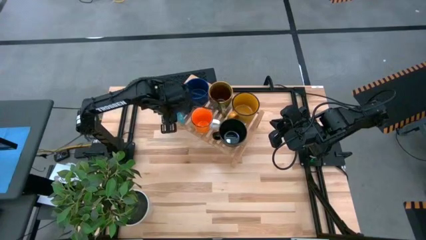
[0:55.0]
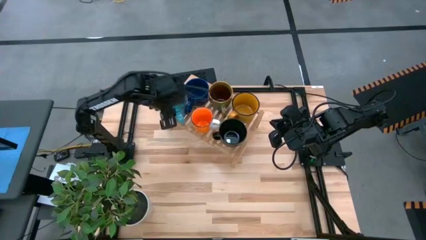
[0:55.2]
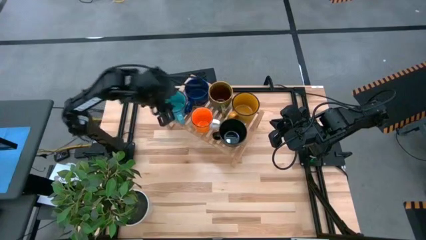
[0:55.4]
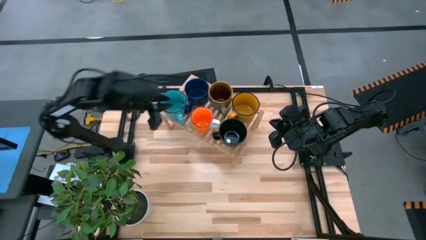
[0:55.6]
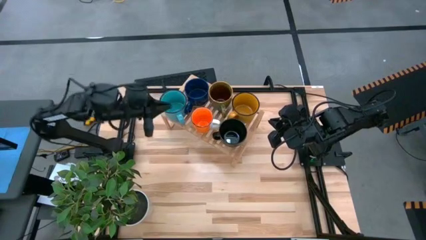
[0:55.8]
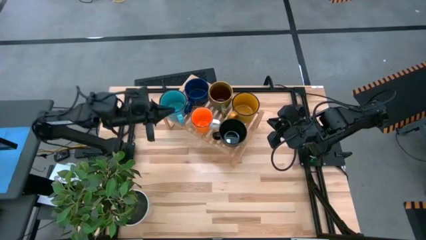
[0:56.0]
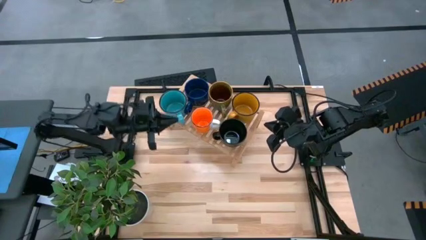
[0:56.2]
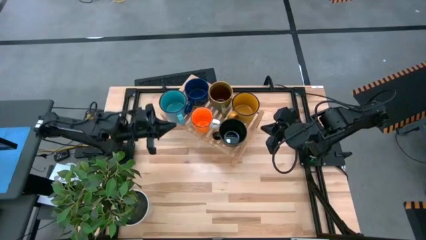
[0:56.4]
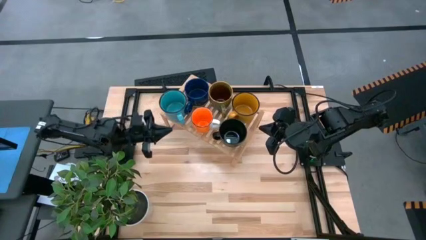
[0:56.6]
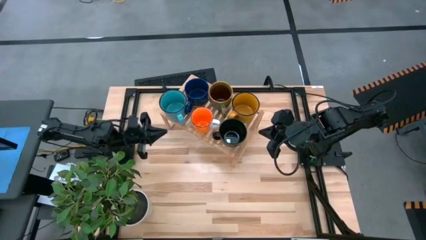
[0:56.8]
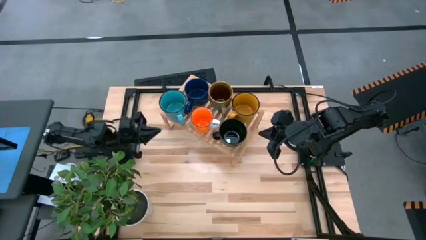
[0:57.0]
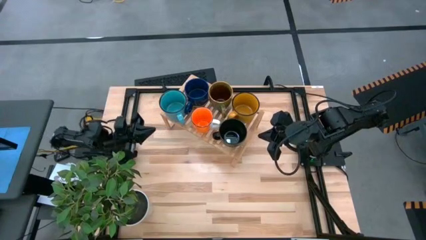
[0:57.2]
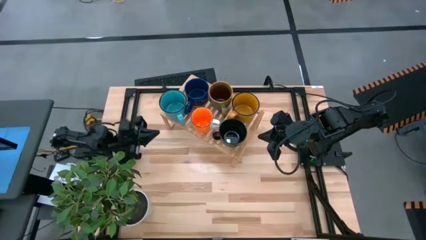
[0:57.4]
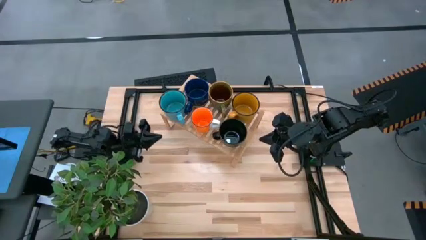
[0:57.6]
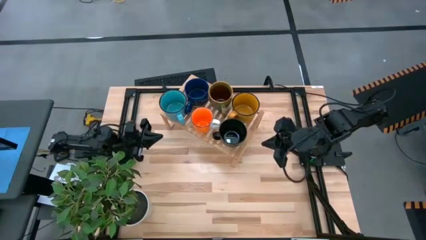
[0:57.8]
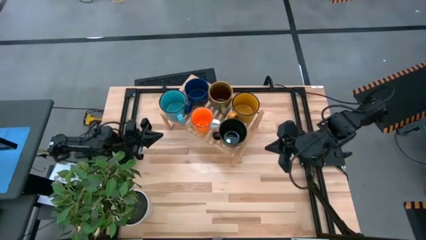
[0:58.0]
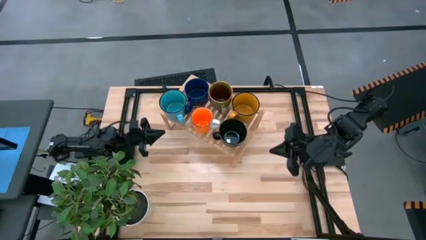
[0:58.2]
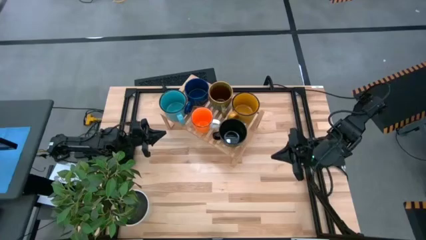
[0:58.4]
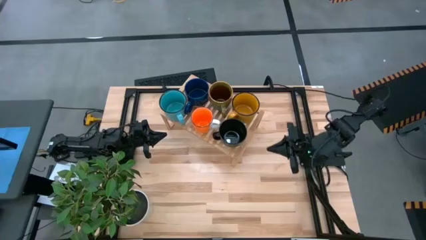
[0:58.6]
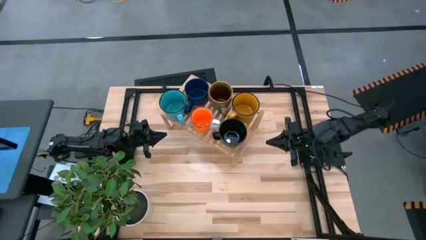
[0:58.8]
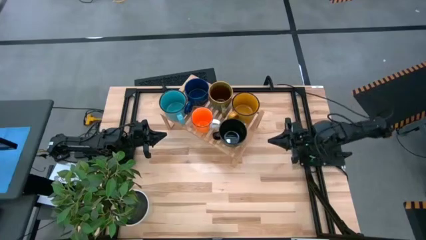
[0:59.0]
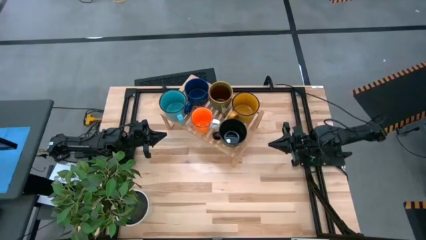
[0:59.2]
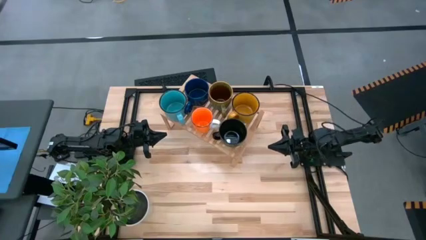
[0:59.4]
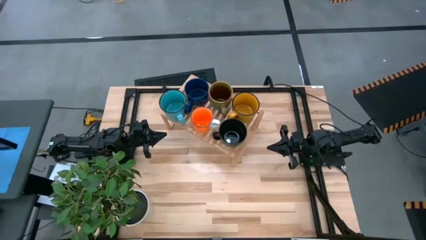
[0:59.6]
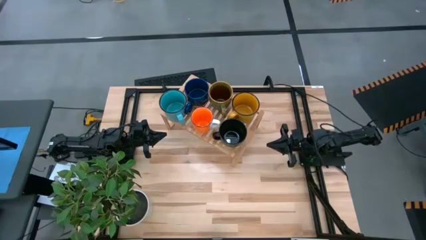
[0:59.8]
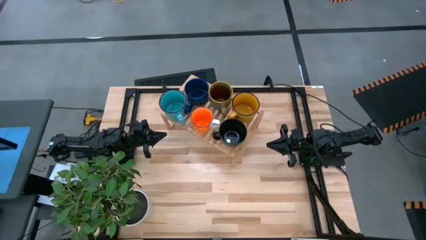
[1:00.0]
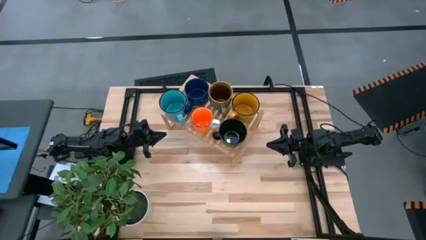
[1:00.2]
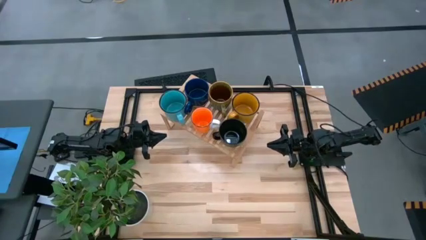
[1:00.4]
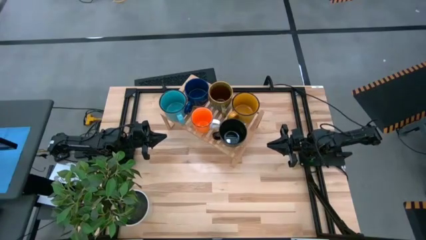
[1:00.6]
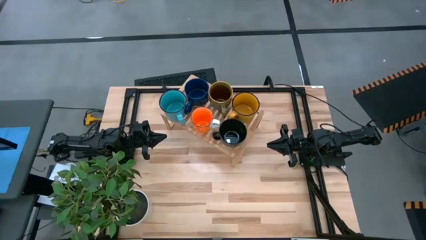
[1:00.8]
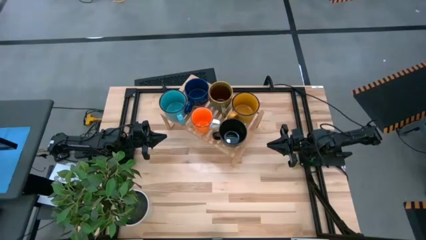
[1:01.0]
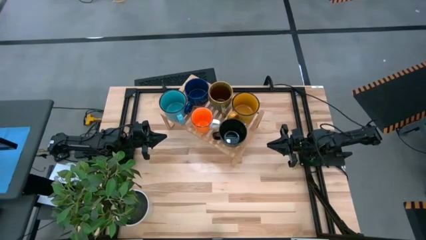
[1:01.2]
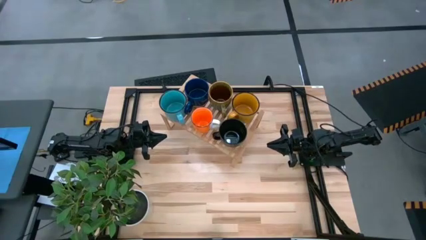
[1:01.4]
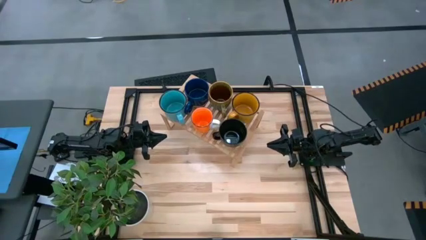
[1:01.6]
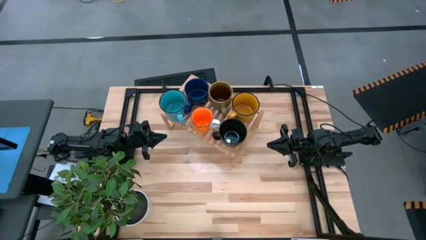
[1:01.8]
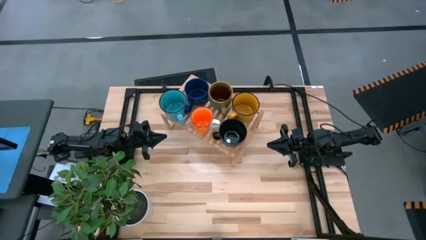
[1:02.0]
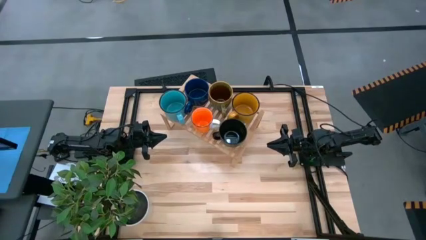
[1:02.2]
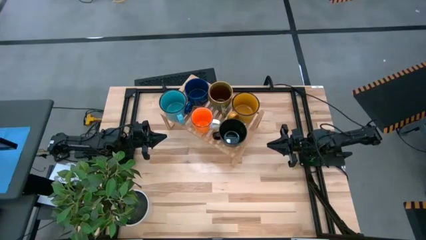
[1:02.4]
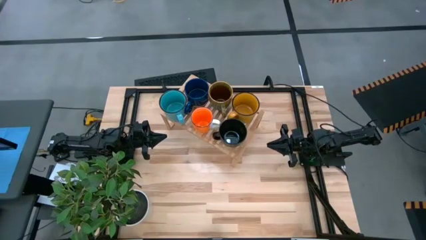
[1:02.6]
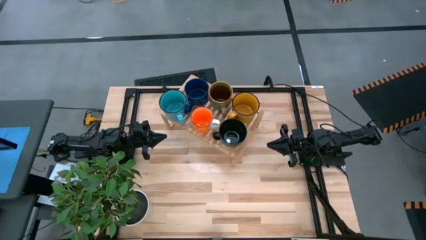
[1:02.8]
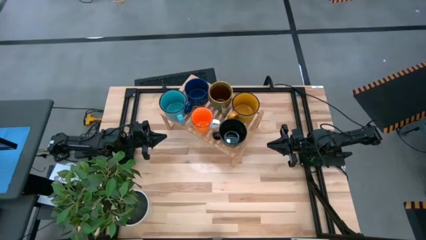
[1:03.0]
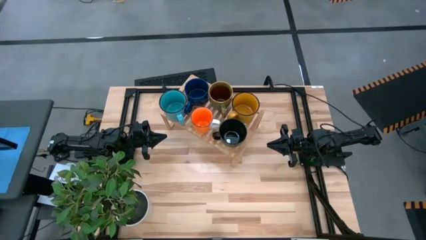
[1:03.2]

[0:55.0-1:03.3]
Task: Place coffee mugs
Return to Home Position

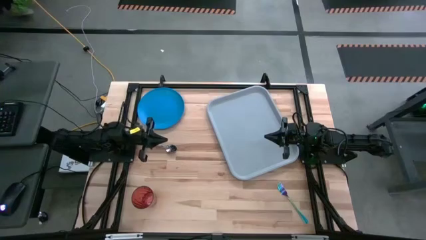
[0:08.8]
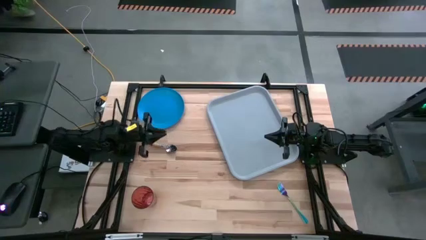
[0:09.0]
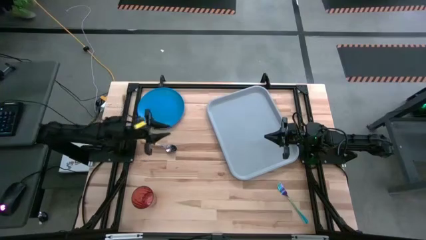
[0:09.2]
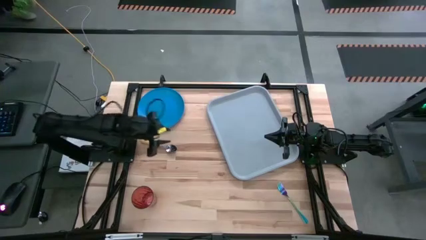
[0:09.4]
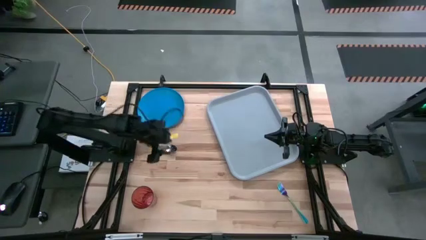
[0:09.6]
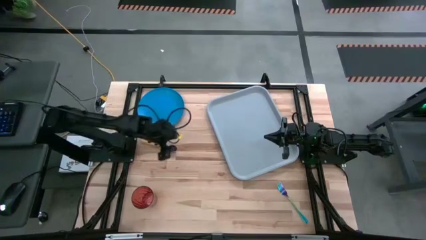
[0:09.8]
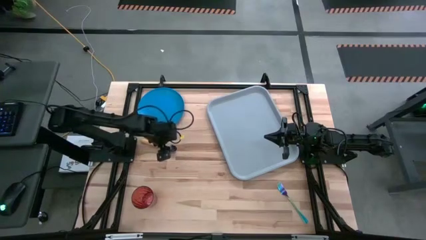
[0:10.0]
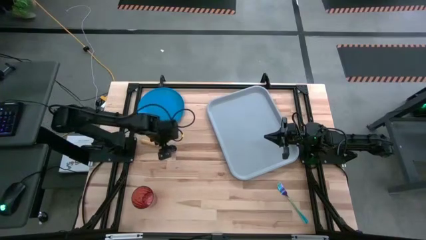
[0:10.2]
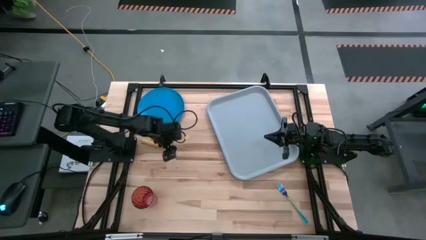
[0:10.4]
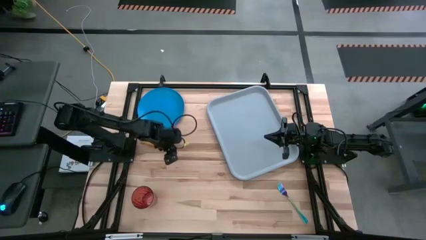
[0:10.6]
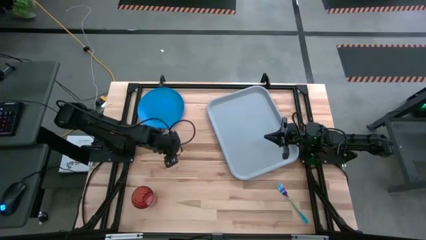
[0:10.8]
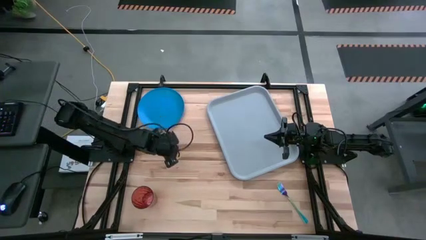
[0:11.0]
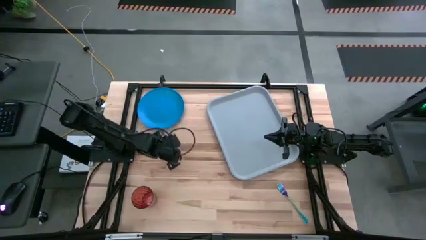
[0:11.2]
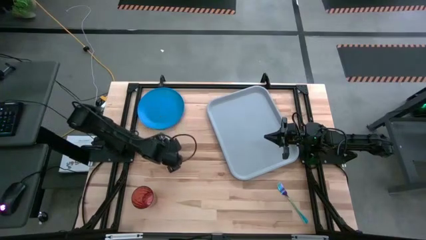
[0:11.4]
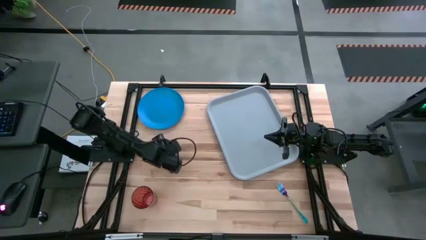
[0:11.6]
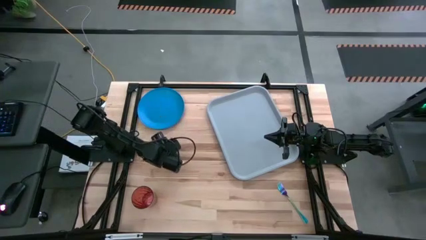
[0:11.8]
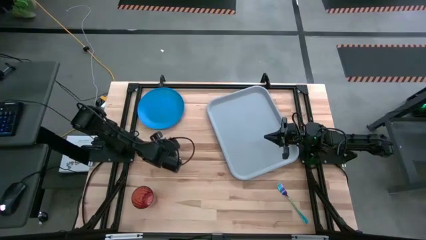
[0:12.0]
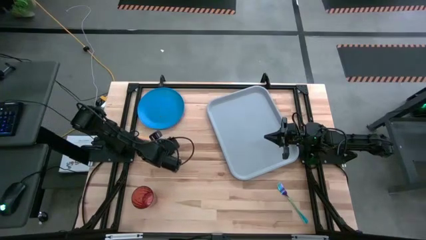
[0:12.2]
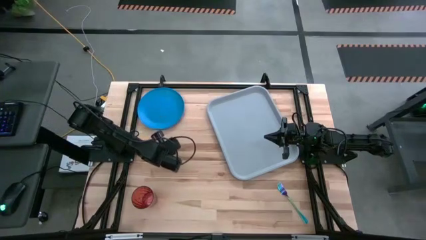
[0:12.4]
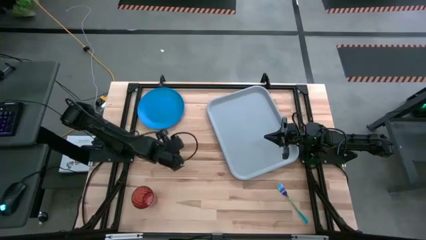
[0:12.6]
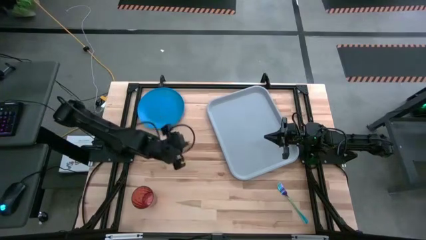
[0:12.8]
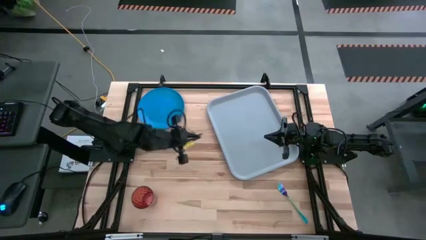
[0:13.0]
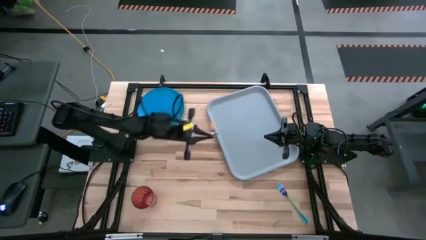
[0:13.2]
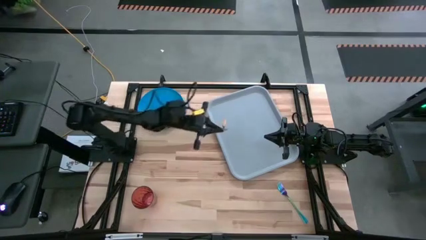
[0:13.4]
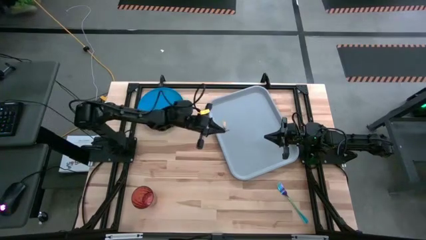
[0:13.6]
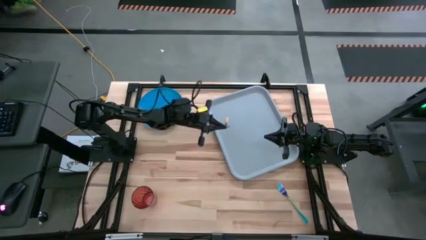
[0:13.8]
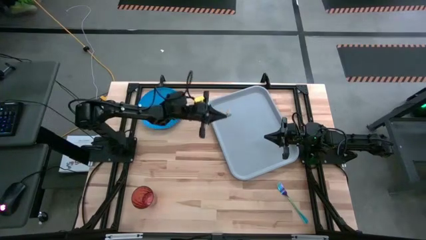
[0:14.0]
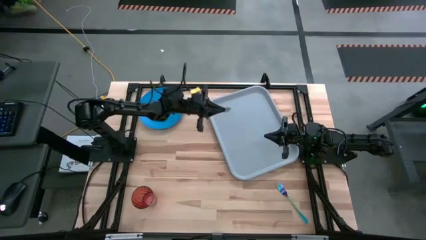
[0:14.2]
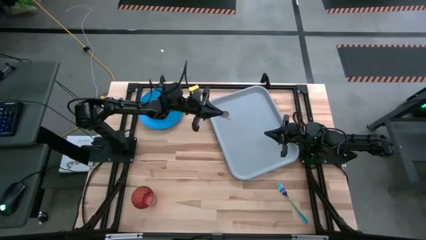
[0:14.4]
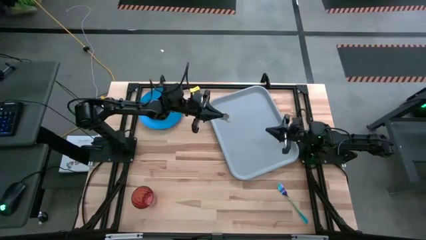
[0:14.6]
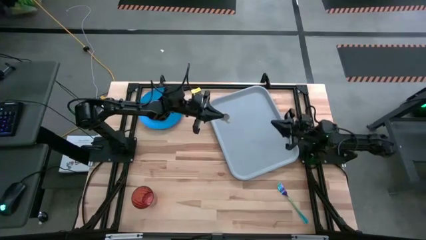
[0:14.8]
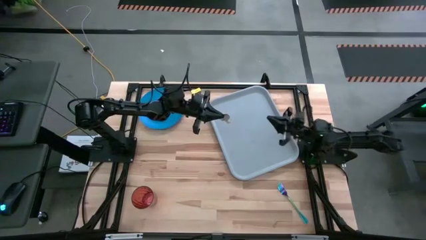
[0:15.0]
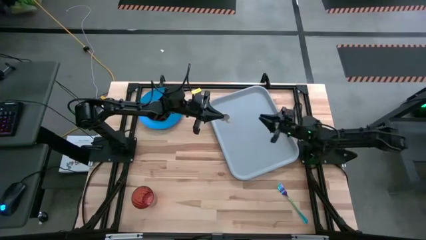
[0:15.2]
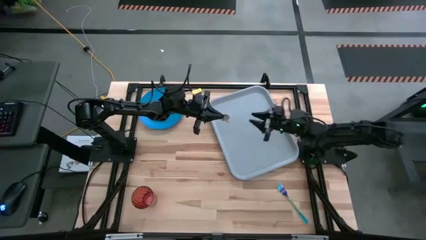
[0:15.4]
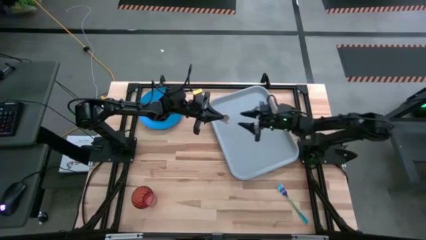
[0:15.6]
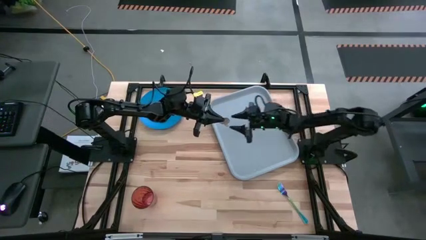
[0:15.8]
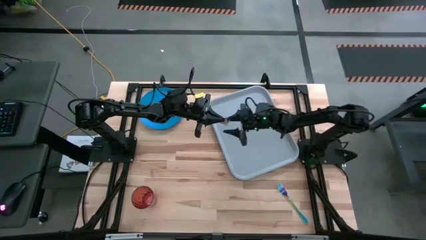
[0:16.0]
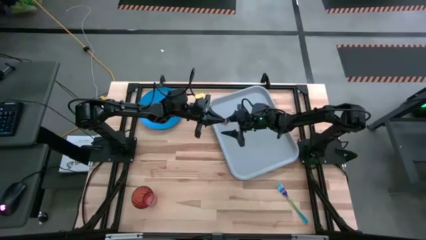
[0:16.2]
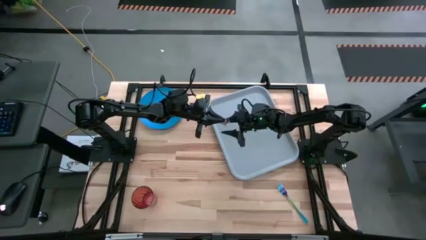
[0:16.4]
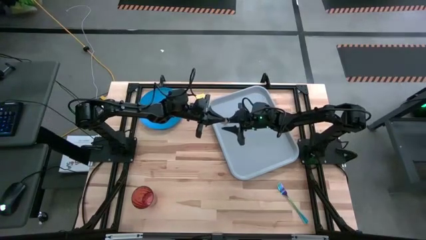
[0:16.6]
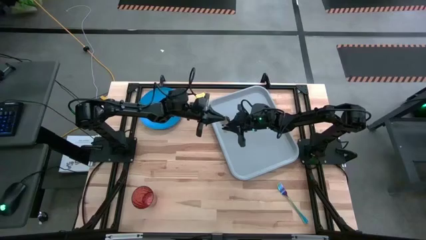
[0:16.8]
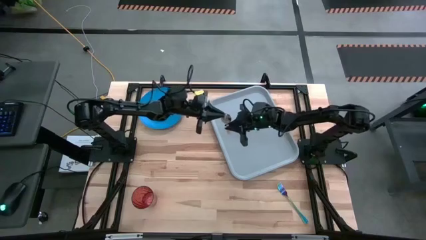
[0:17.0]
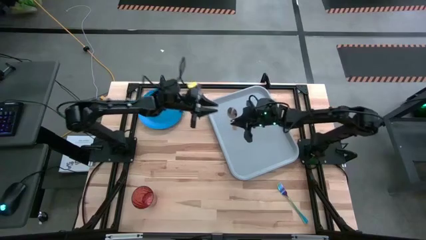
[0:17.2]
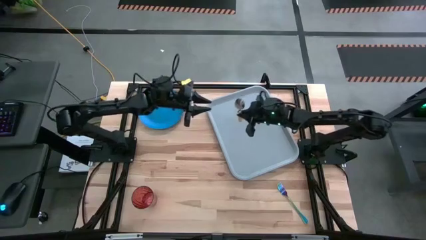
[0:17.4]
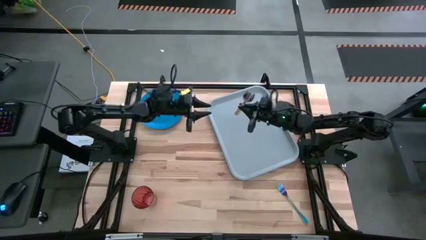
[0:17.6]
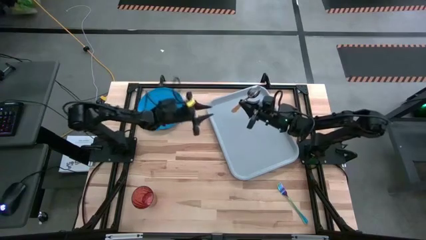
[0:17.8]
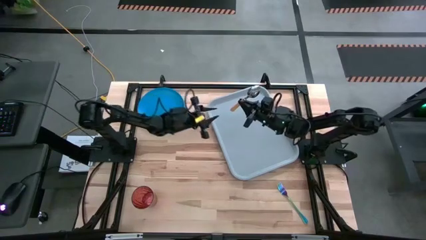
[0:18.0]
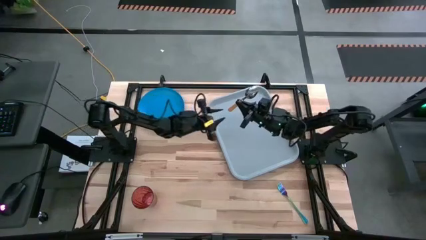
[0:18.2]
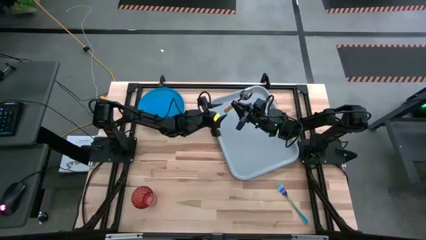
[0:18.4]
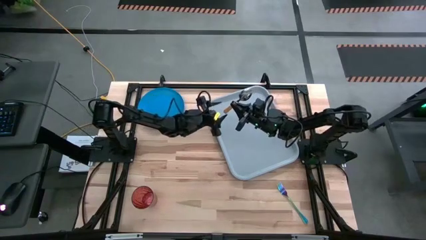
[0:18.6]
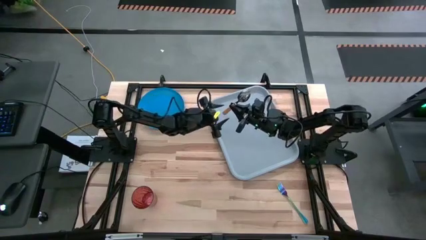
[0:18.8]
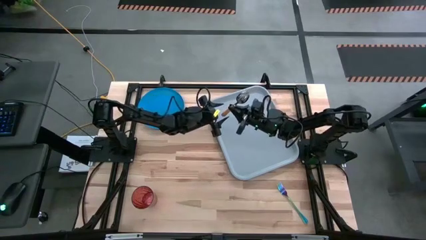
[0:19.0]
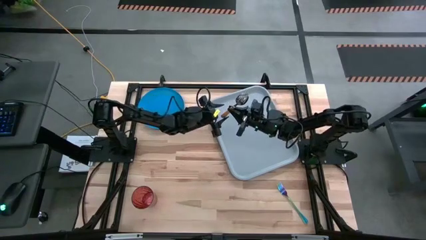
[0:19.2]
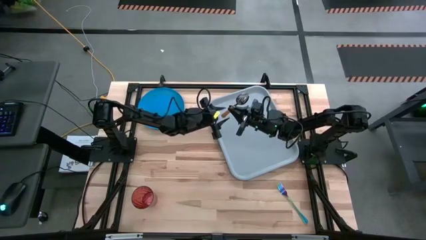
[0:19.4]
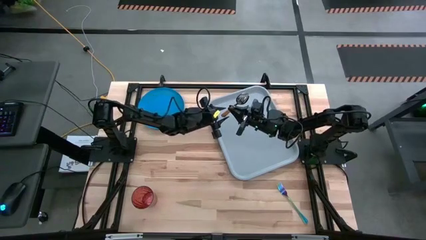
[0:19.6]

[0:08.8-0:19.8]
Task: Pick and place plate/cup/fork/spoon on tray
Put the yellow spoon on the gray serving tray
